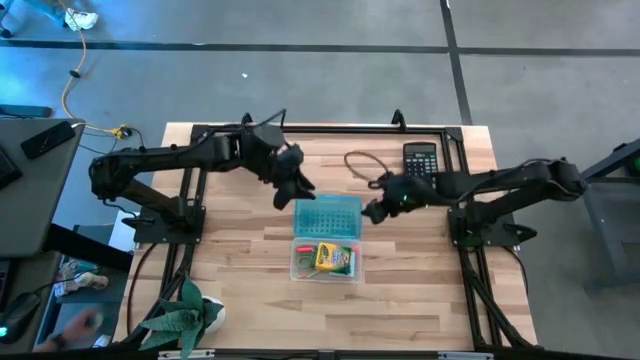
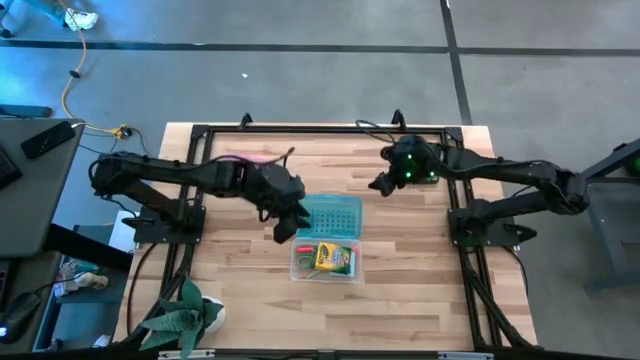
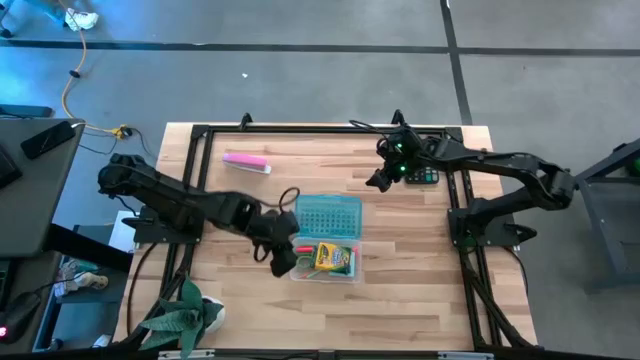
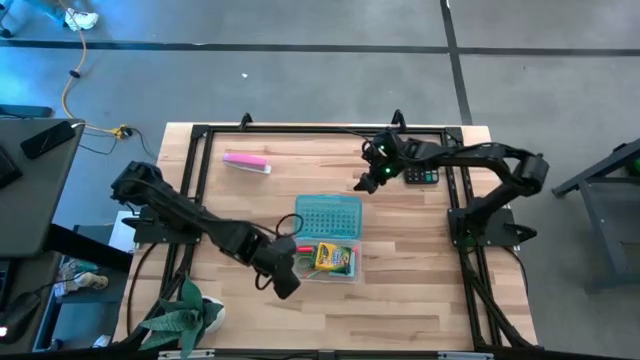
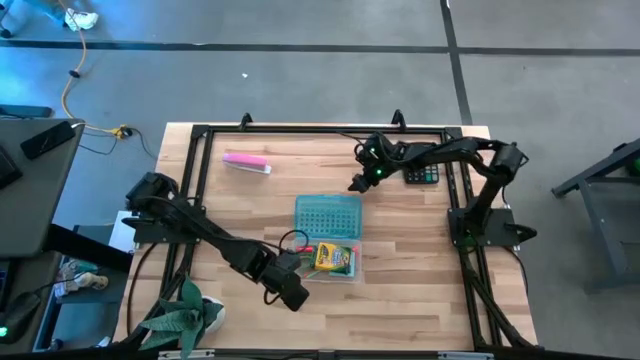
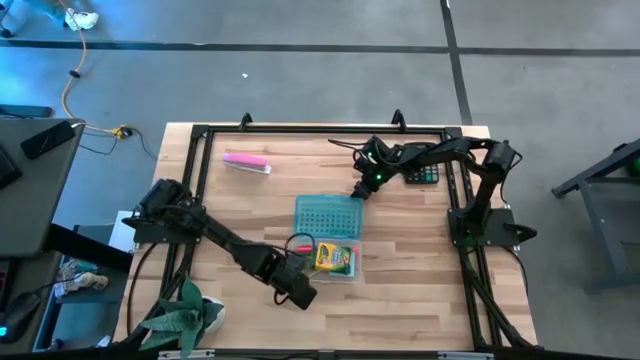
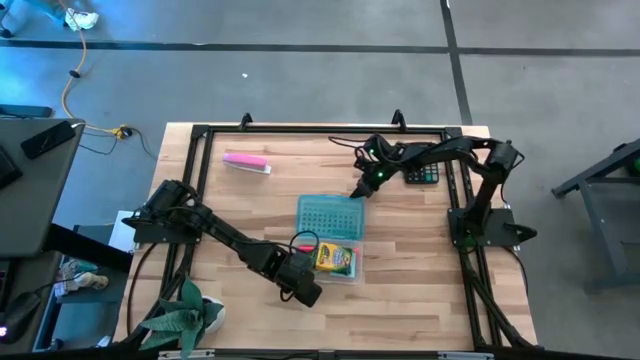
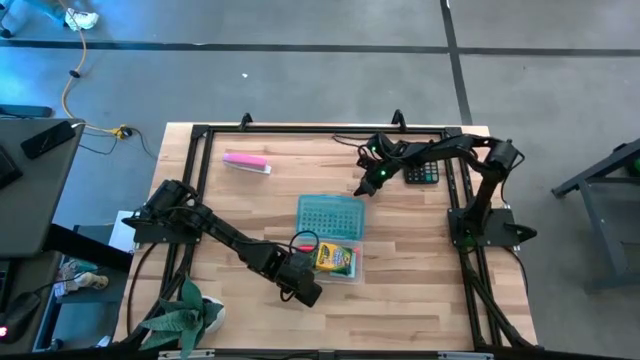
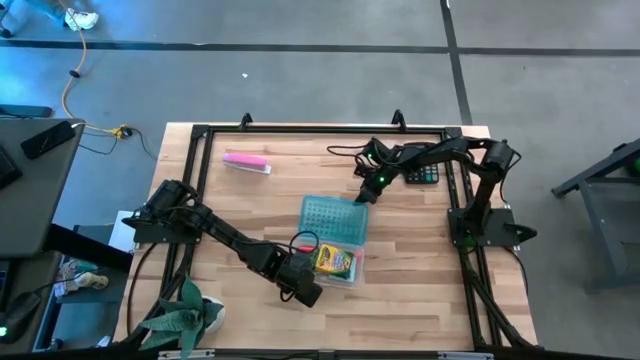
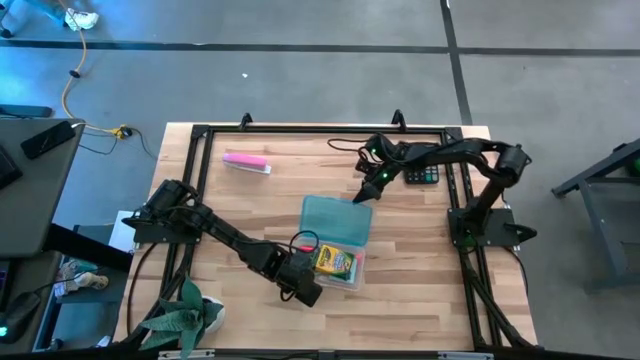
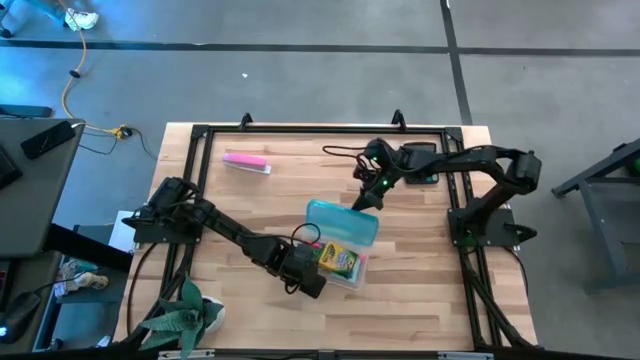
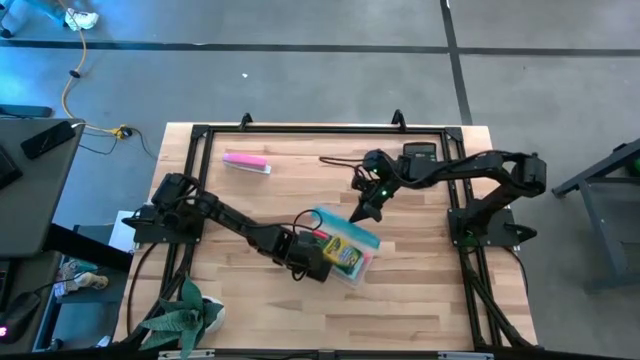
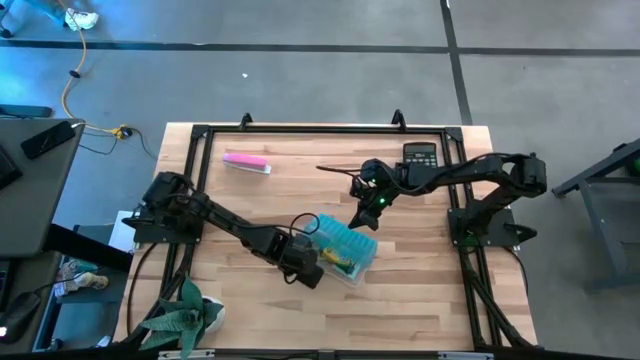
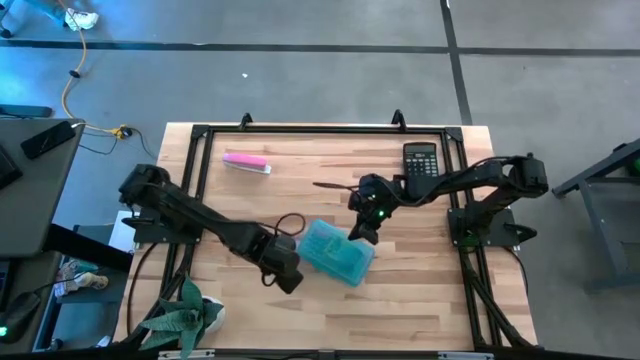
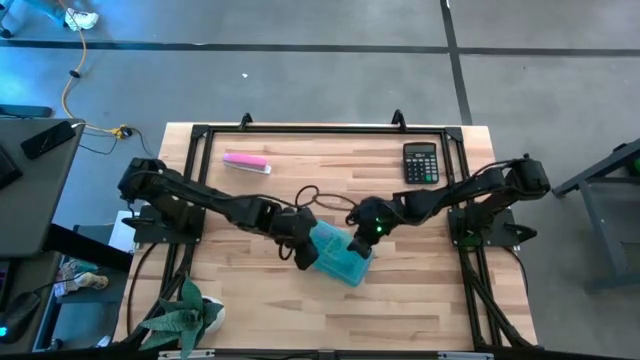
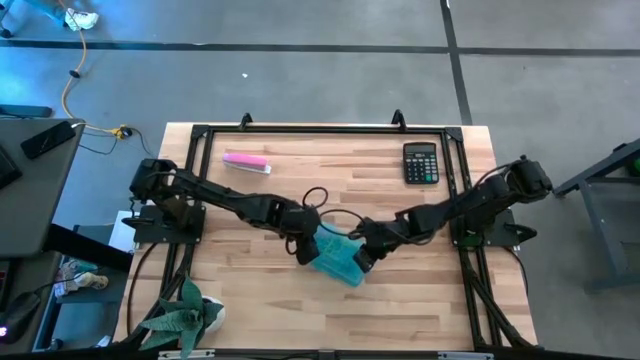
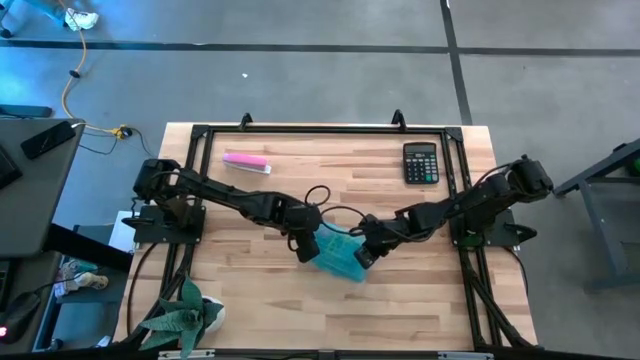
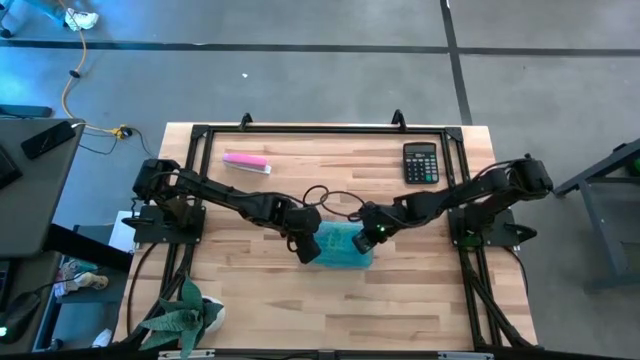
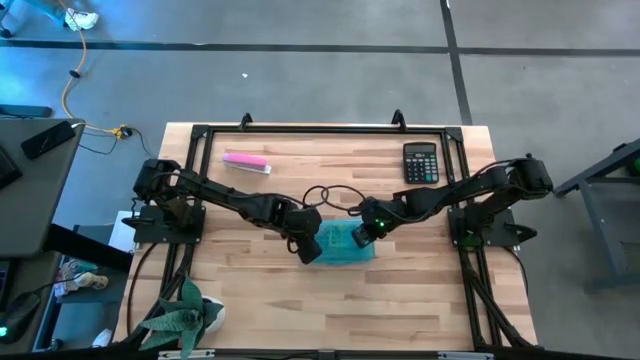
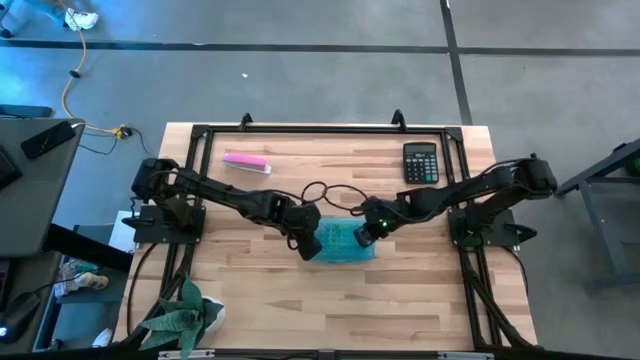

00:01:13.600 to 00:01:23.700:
Task: Pack school essentials
Close the supply box

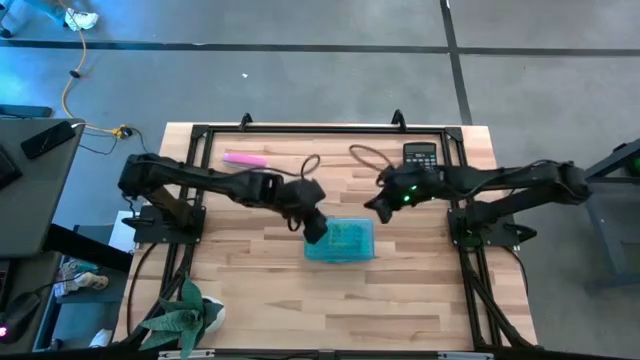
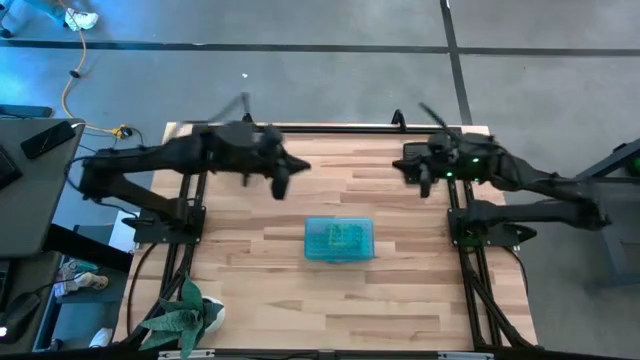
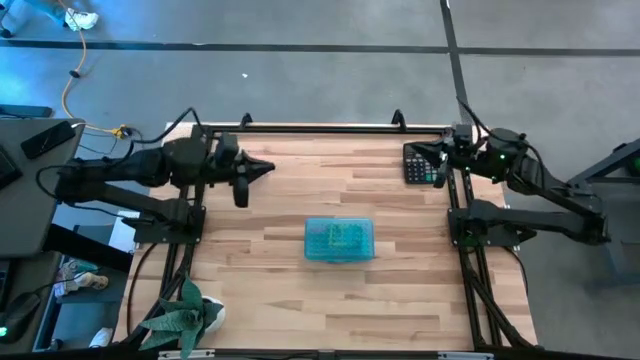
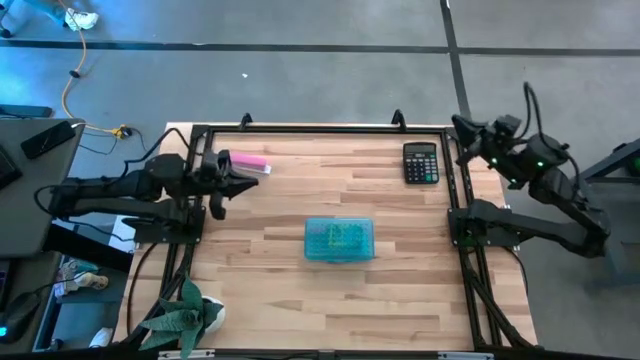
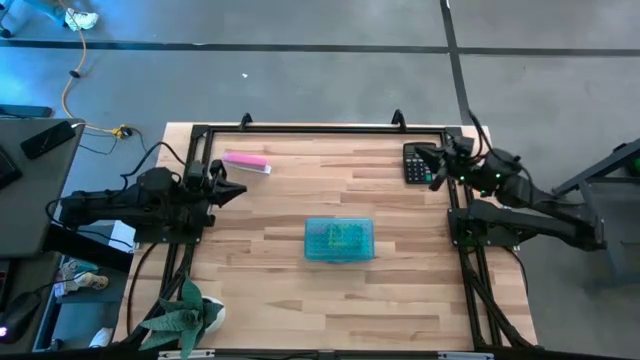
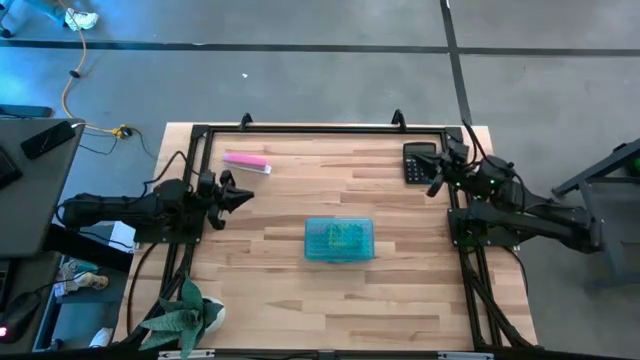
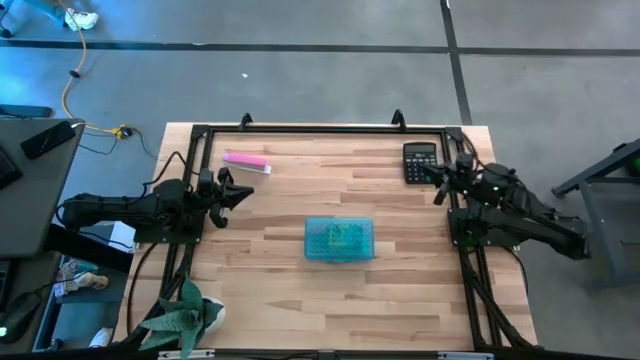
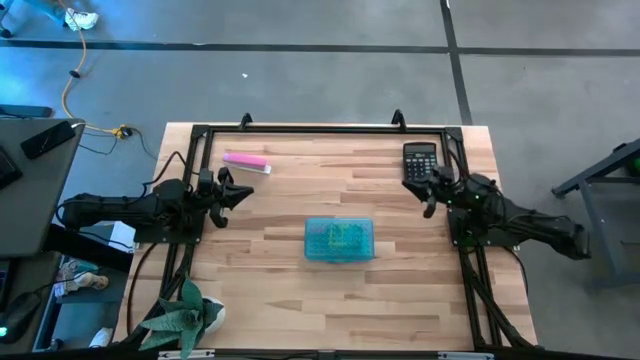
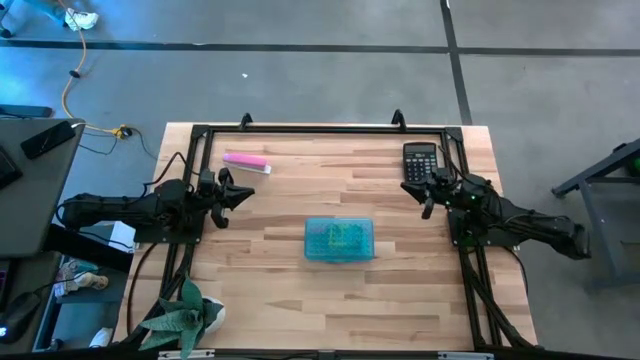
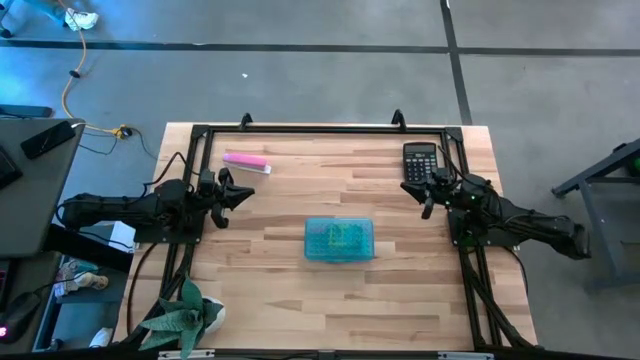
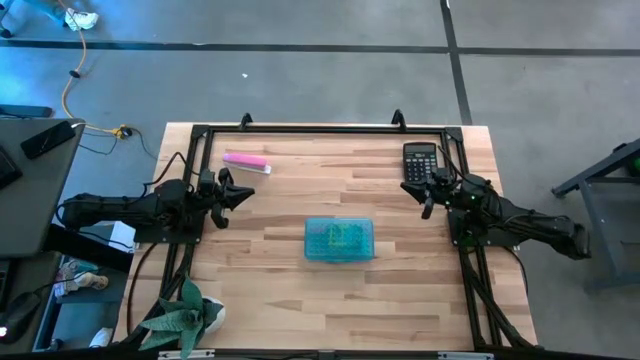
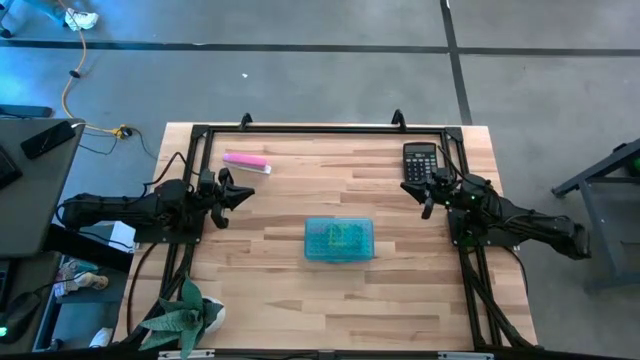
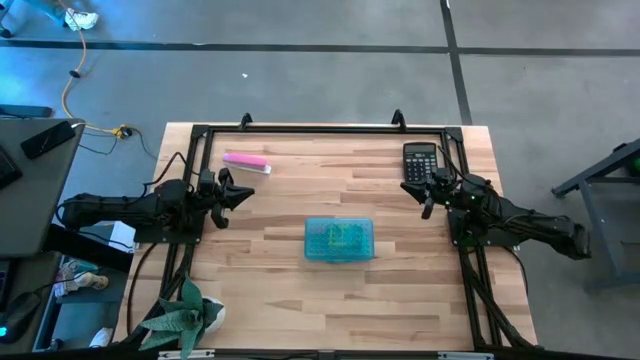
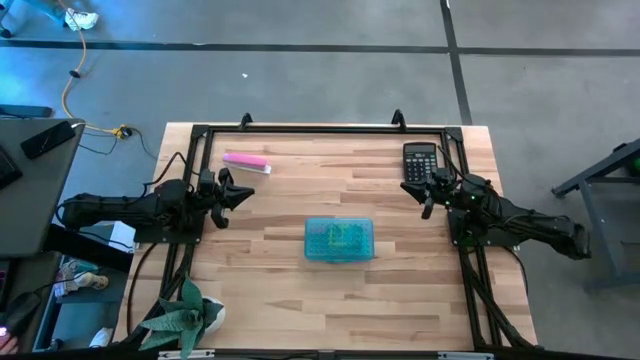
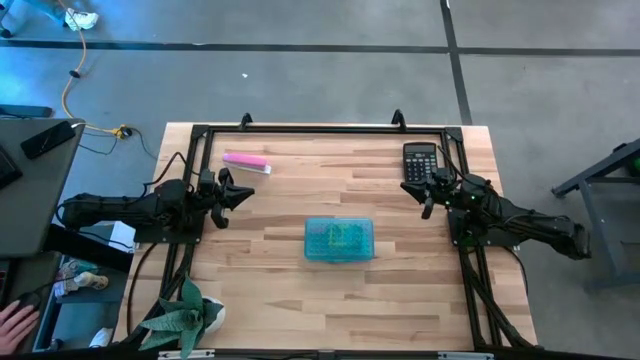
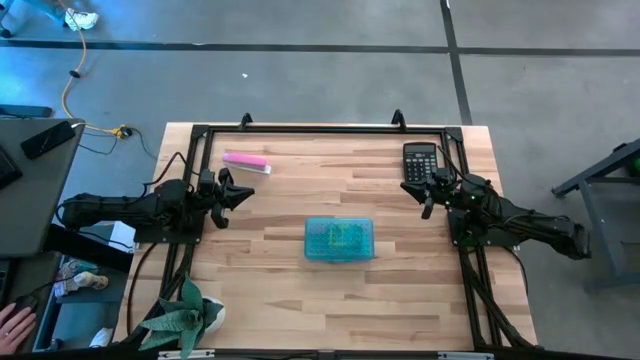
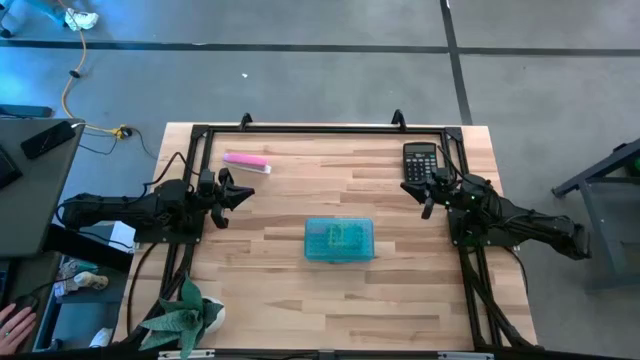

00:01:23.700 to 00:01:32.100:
Return to Home Position

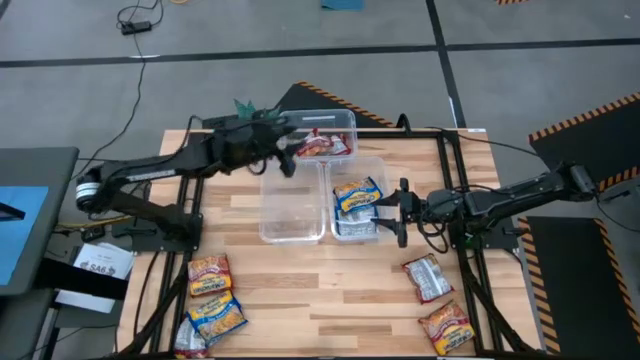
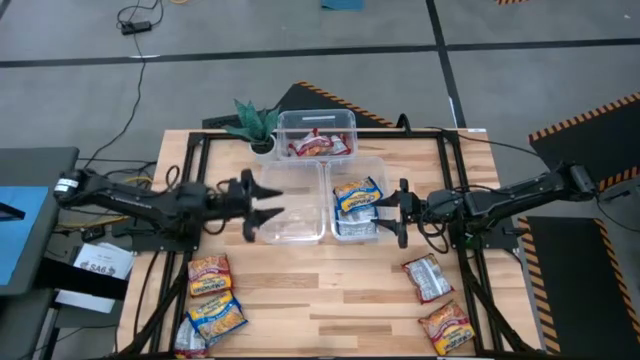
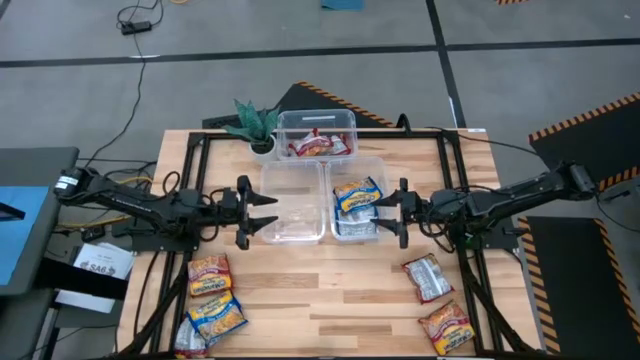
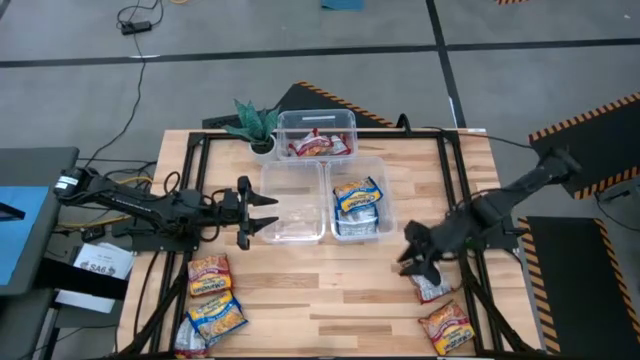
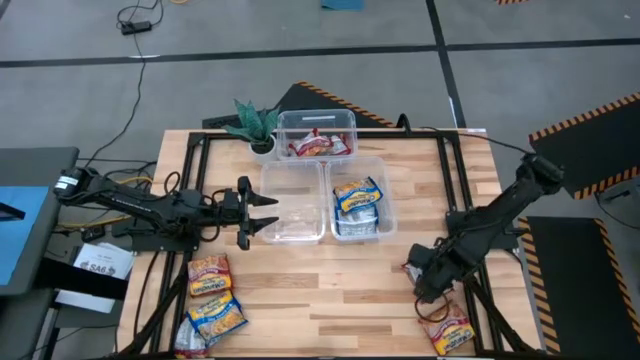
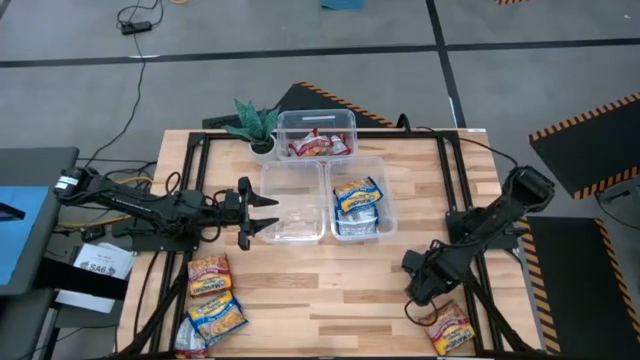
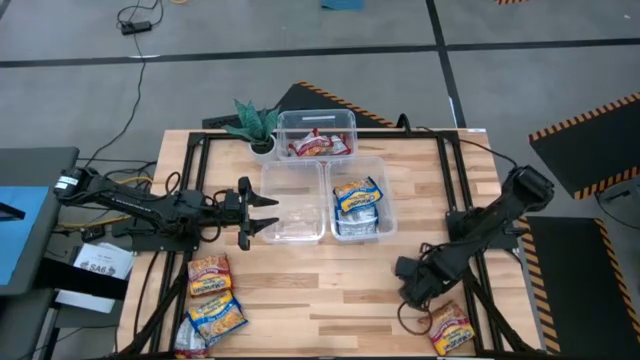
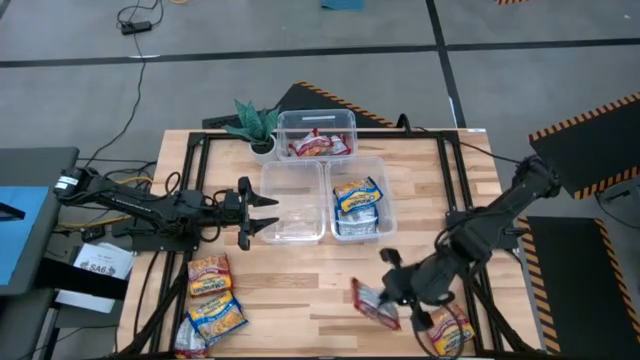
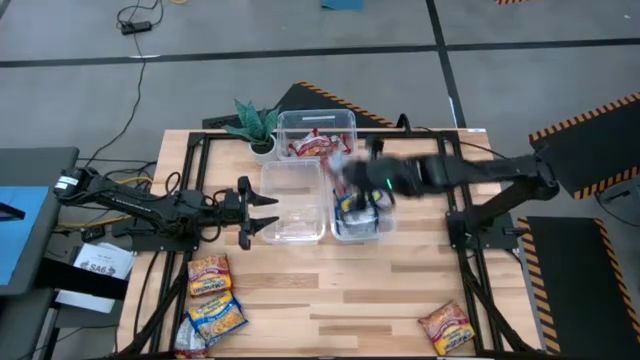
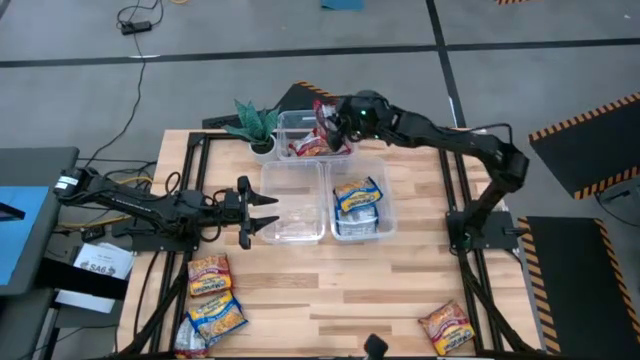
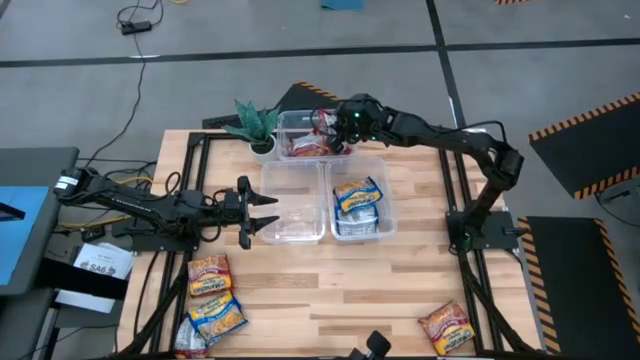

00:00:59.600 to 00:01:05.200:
Task: Sort Maruchan noodles
Put the red noodle pack into the top transparent bin
